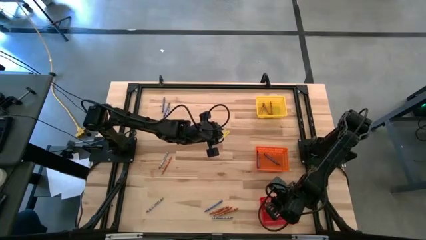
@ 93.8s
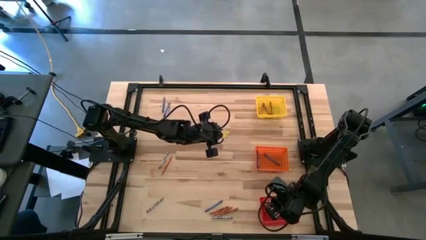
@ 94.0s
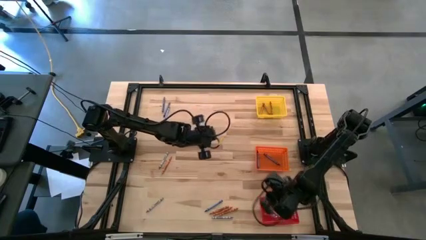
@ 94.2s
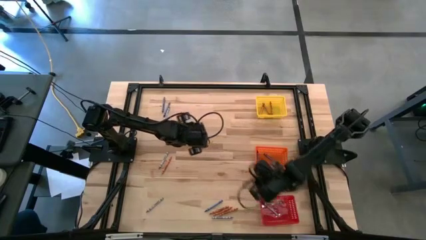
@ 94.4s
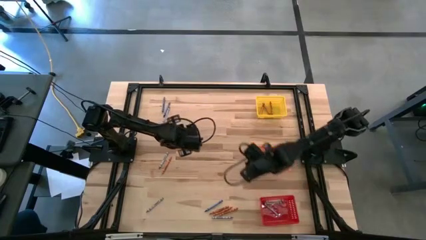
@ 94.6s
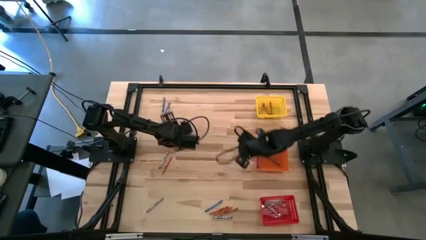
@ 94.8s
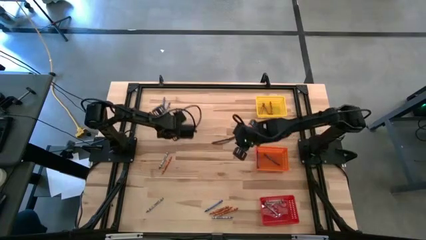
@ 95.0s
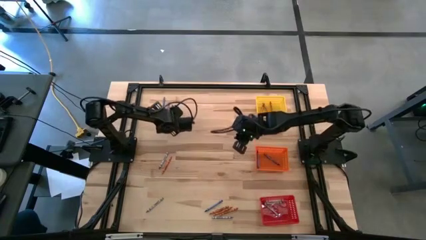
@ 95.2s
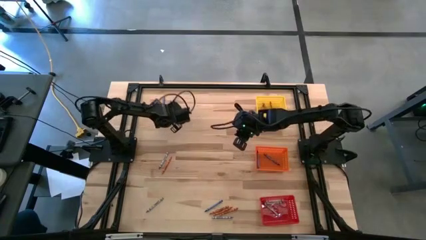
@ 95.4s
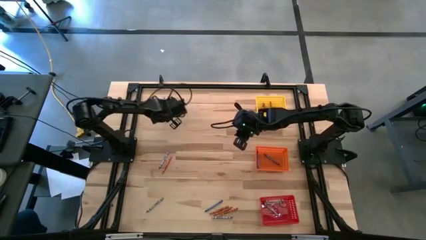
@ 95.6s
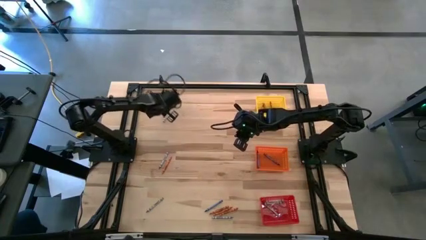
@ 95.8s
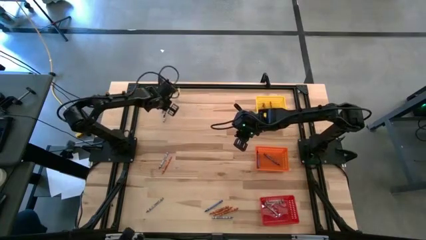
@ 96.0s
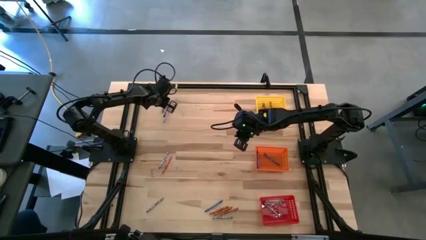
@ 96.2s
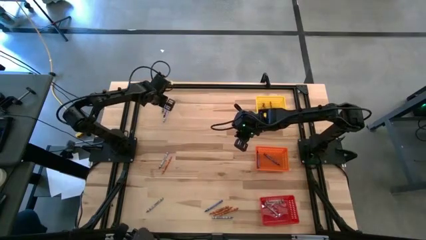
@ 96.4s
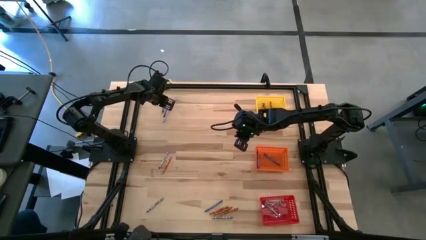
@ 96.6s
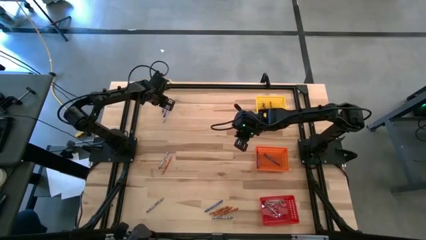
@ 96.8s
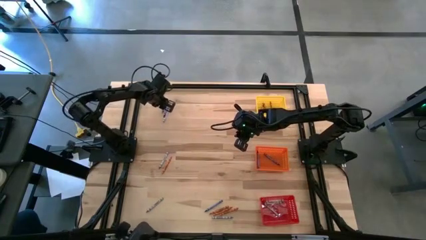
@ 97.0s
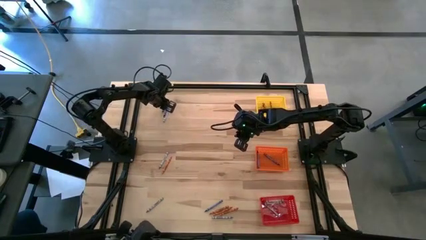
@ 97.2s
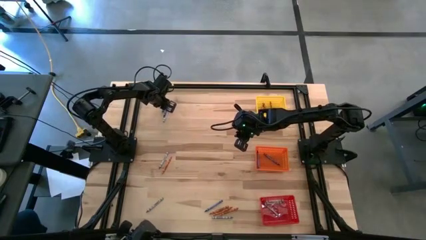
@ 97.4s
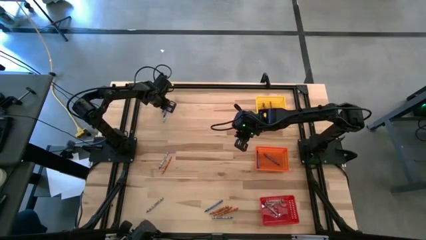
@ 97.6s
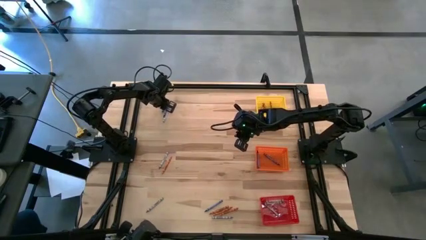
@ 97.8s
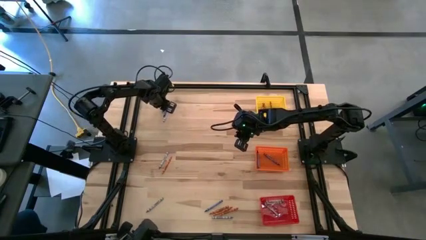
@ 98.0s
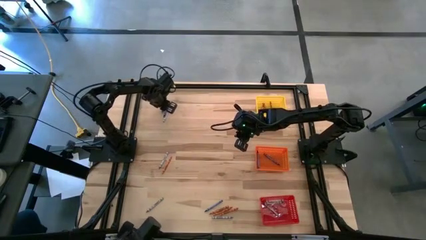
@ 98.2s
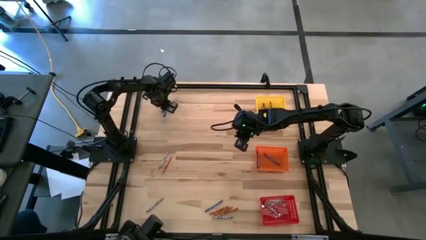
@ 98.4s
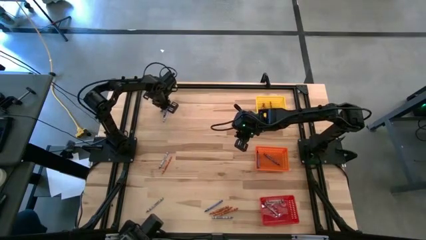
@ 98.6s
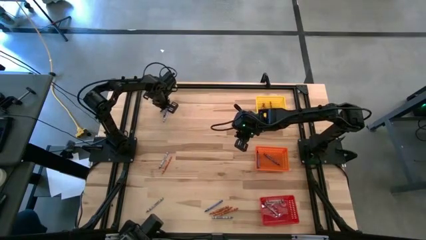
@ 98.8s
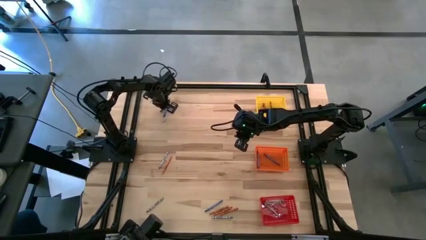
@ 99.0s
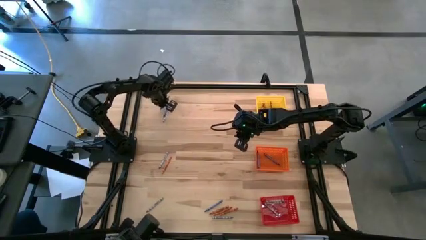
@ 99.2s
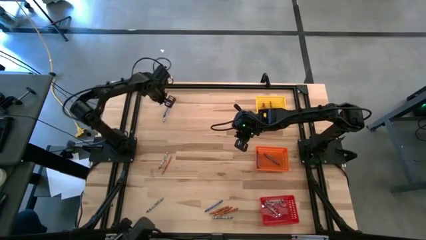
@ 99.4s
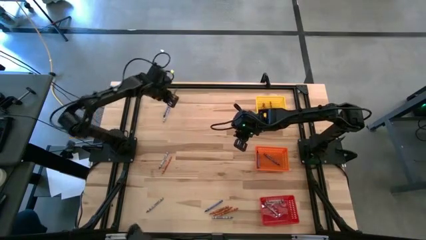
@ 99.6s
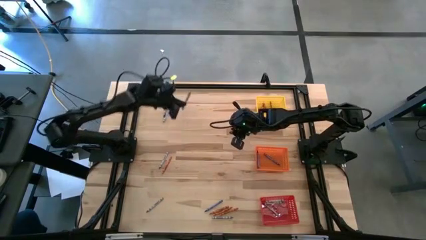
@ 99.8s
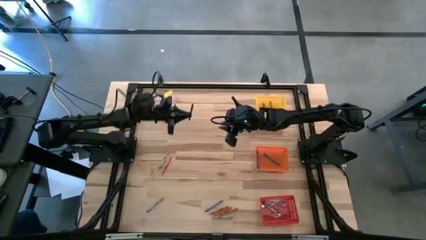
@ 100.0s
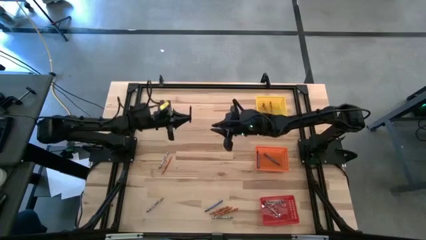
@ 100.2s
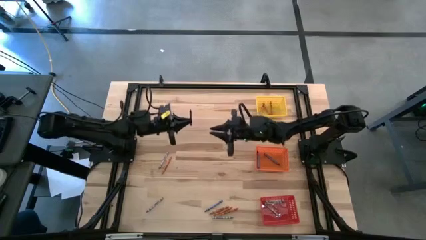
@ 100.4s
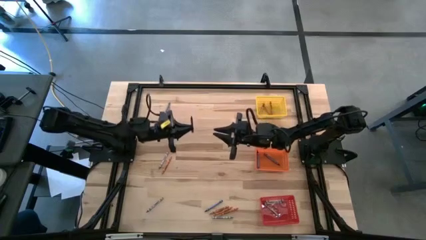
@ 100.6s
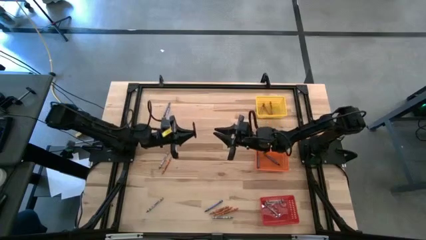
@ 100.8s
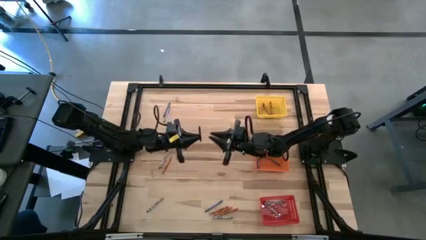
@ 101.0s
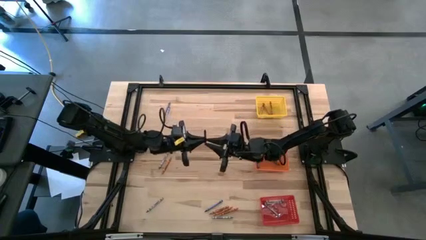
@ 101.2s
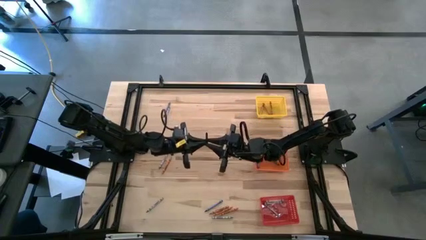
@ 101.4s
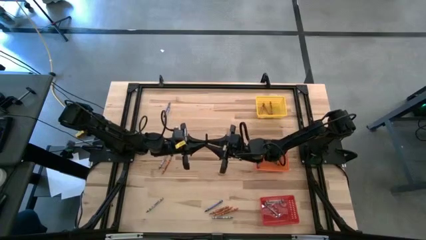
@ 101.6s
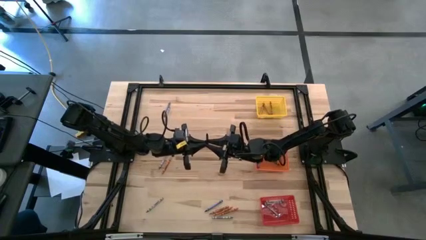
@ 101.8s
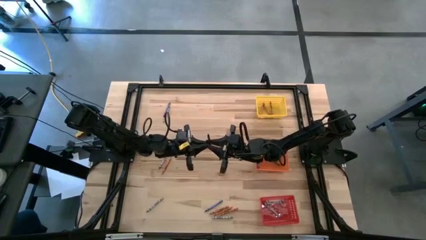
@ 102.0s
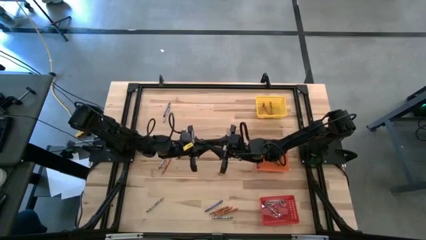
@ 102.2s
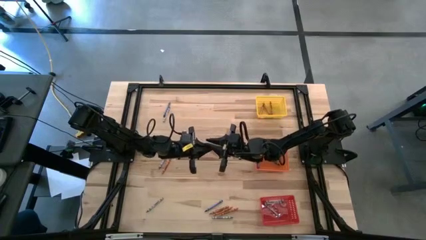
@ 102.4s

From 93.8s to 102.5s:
Task: Sort crayons
Put the blue crayon into the orange bin

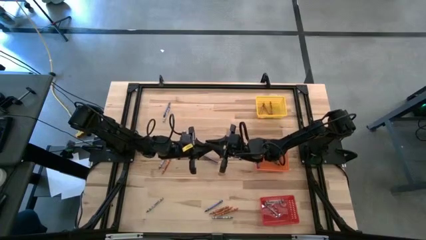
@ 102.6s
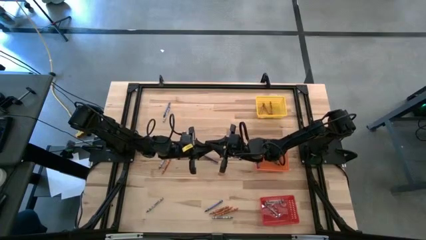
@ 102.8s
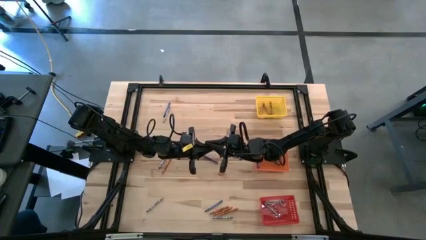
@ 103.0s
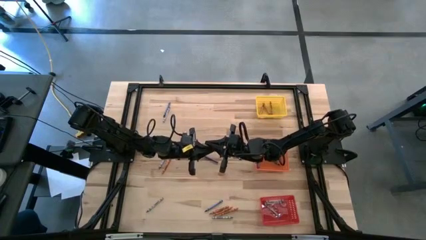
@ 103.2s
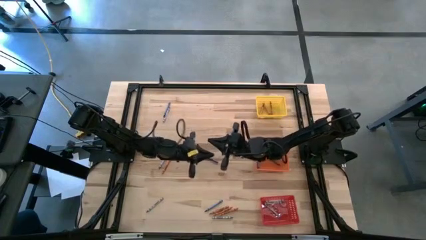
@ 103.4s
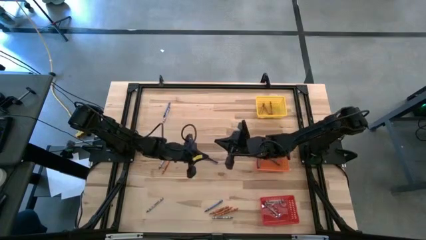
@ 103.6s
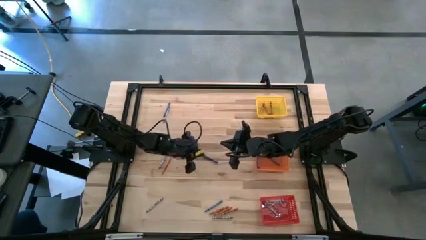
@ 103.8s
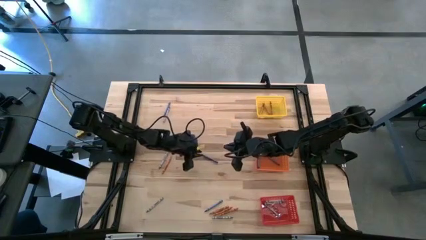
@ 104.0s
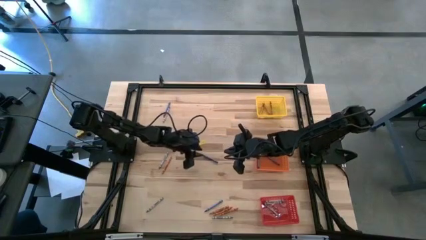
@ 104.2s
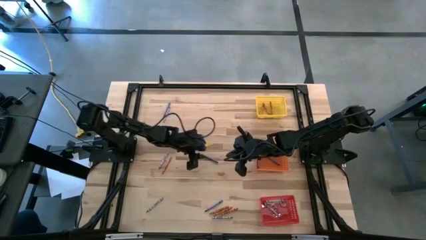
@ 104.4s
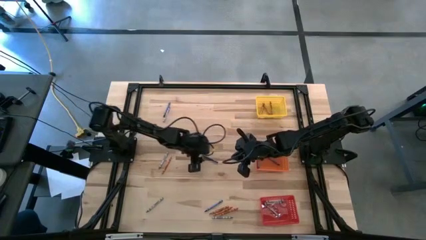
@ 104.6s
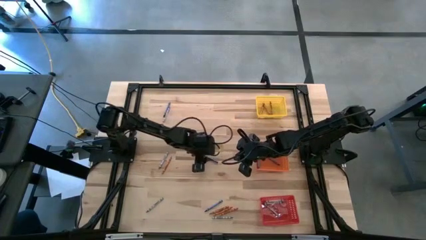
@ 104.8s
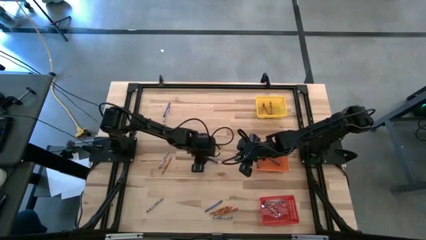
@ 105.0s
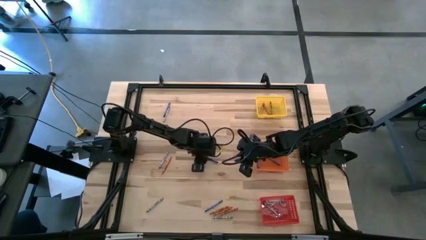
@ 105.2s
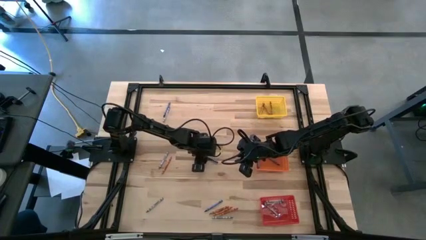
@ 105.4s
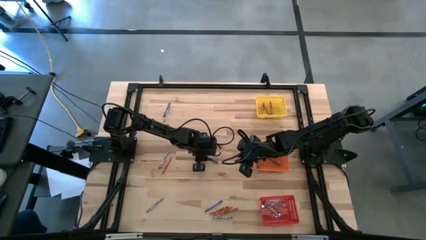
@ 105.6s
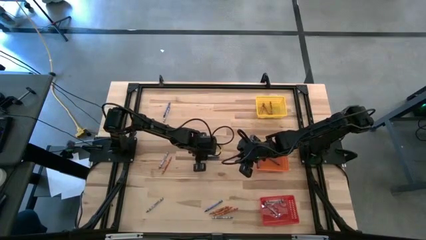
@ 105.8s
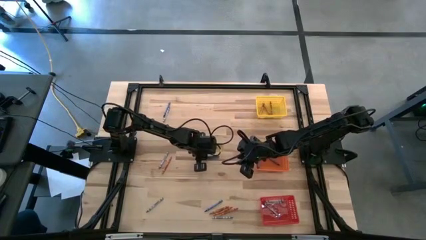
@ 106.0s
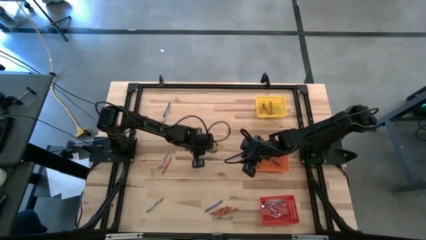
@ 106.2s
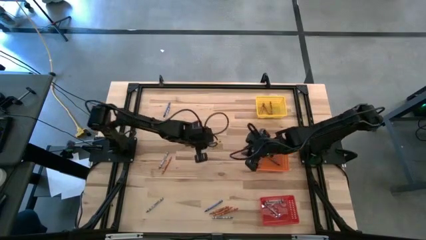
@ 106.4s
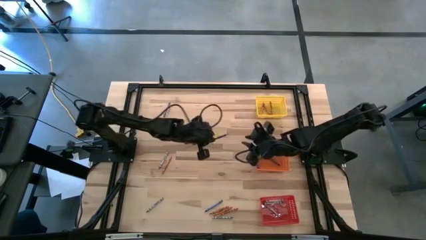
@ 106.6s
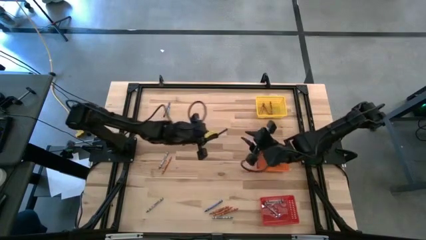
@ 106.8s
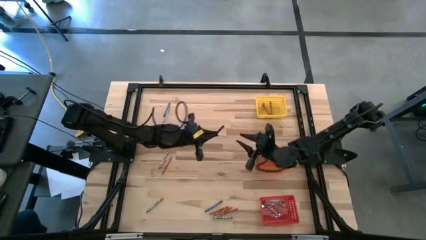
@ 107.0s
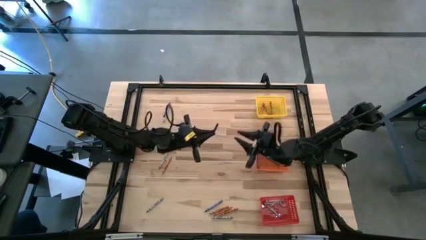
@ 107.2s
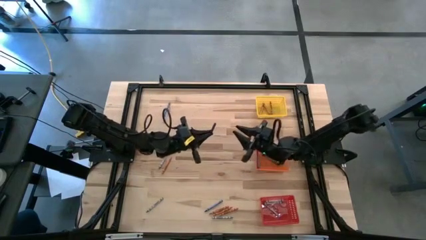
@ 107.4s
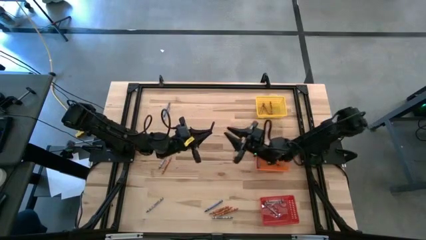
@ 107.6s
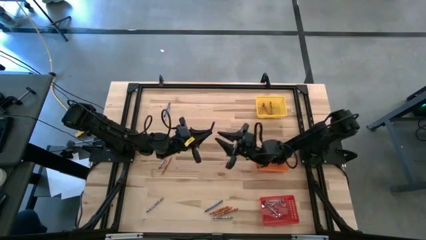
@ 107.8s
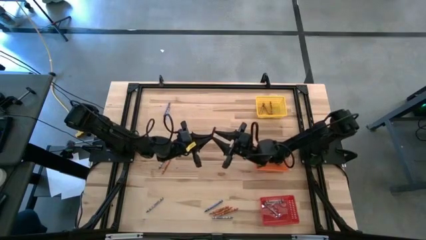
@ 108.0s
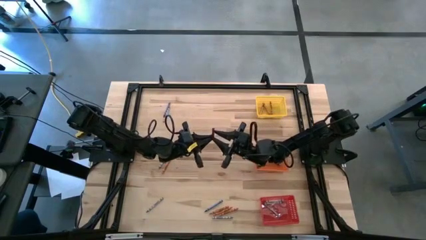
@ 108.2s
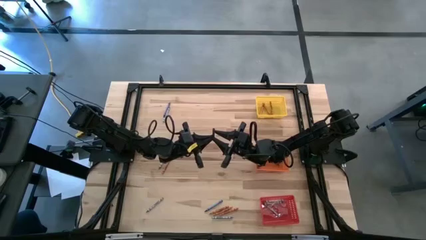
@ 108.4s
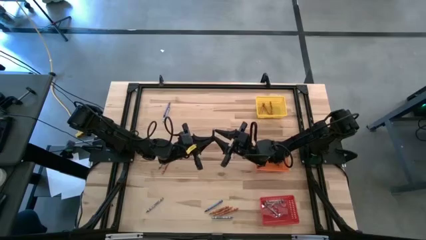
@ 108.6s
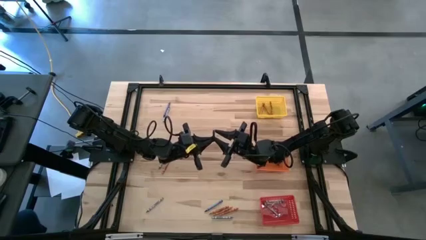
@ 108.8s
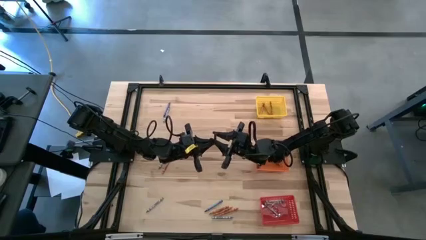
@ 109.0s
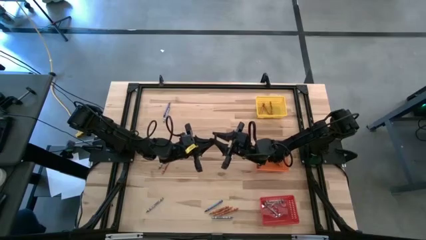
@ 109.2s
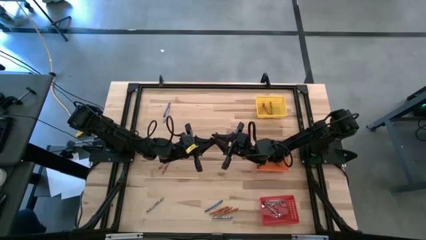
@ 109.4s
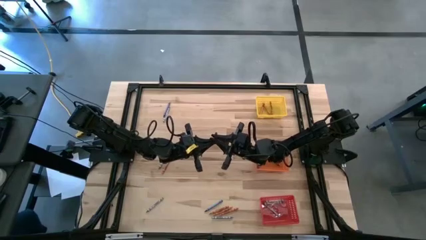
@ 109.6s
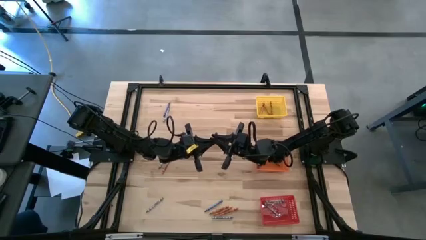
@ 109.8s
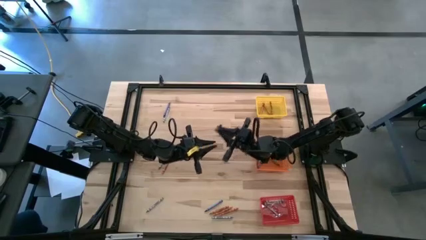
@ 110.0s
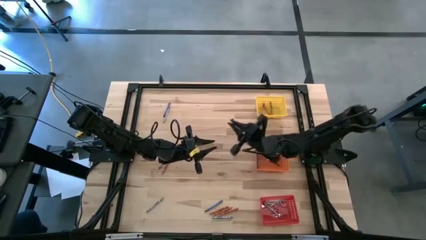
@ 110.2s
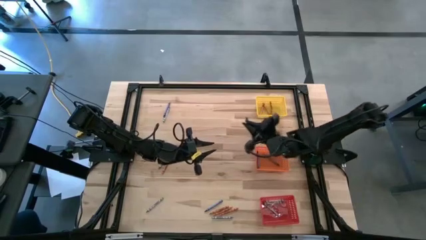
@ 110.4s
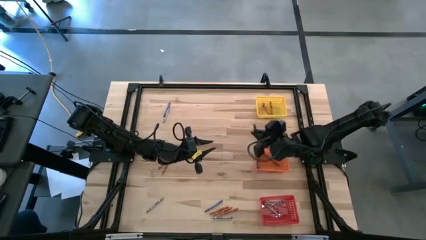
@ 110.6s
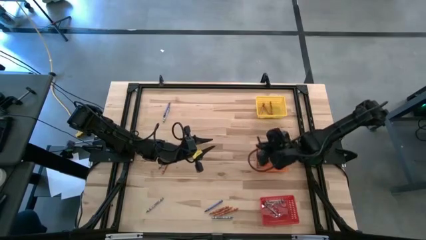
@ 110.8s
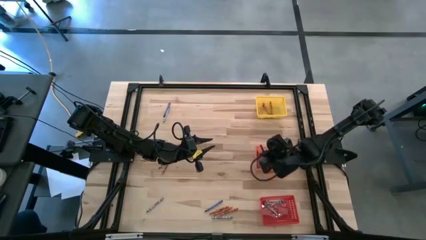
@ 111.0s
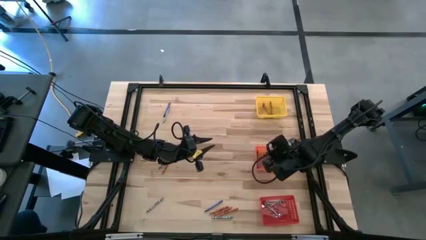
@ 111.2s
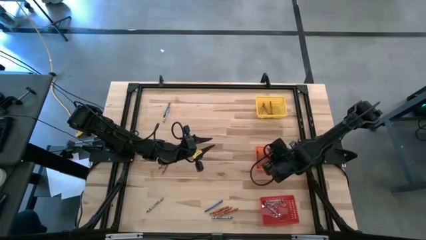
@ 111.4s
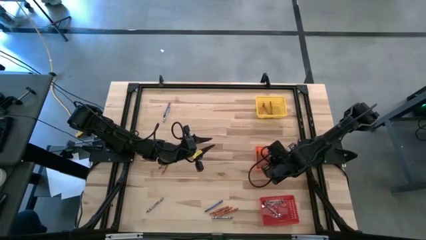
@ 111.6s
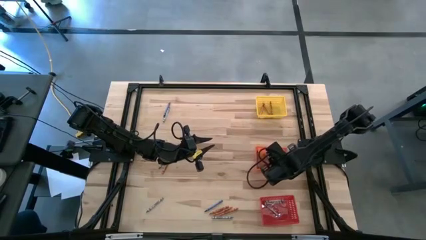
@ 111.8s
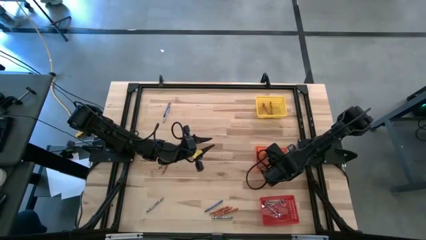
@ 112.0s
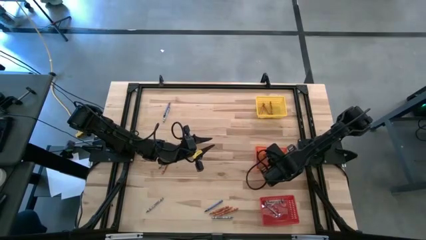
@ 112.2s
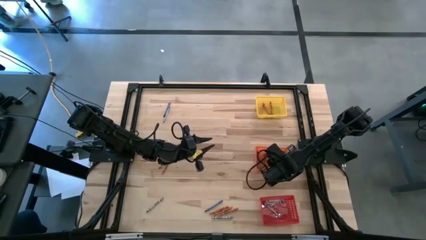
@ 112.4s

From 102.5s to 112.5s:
Put the blue crayon into the orange bin
